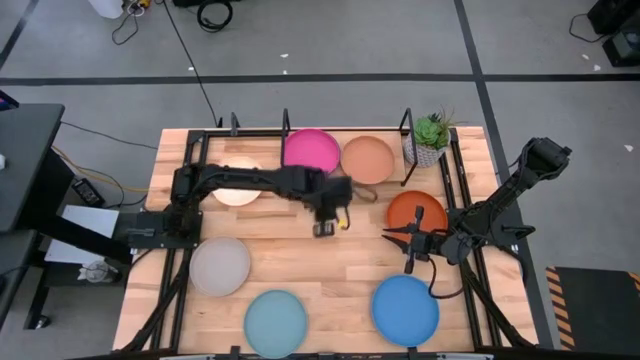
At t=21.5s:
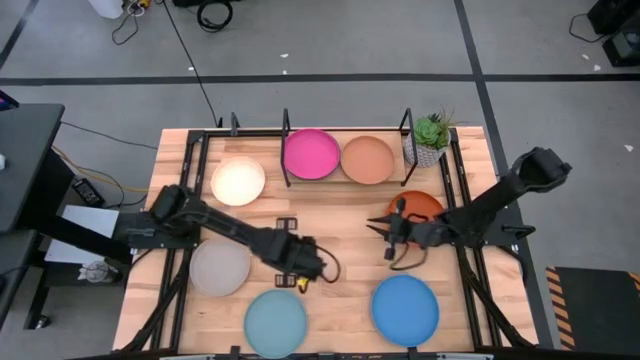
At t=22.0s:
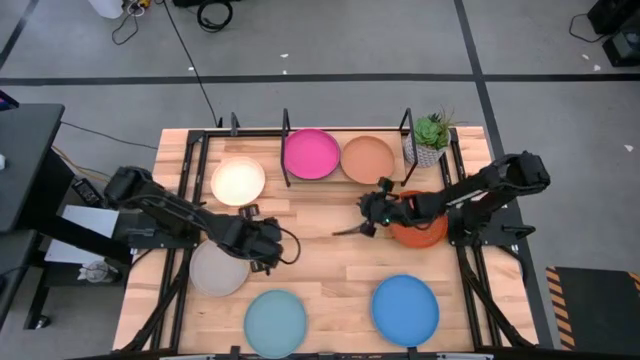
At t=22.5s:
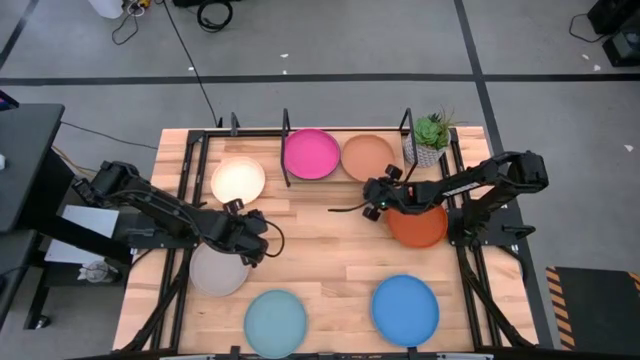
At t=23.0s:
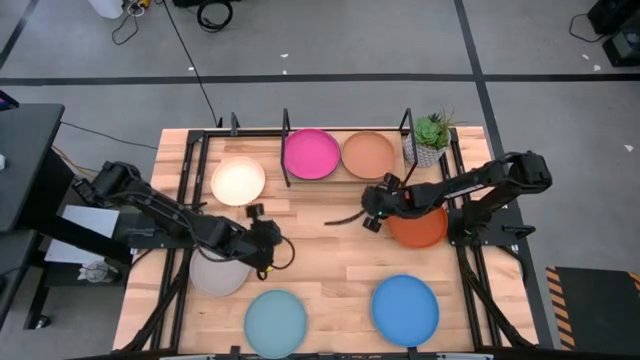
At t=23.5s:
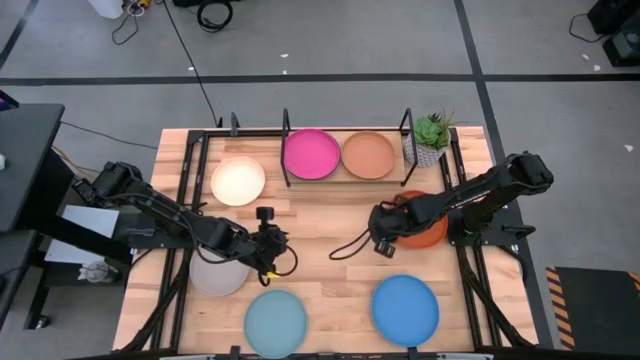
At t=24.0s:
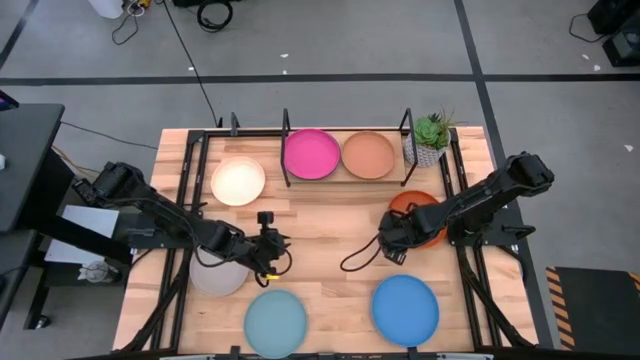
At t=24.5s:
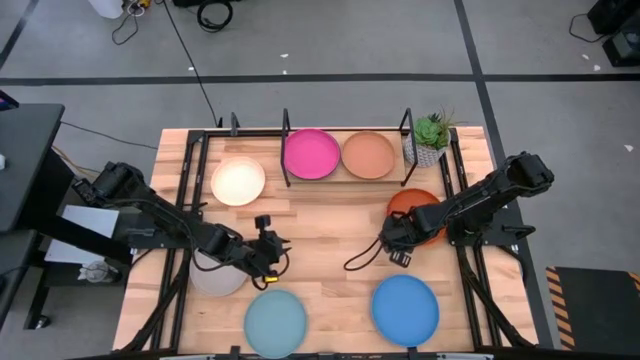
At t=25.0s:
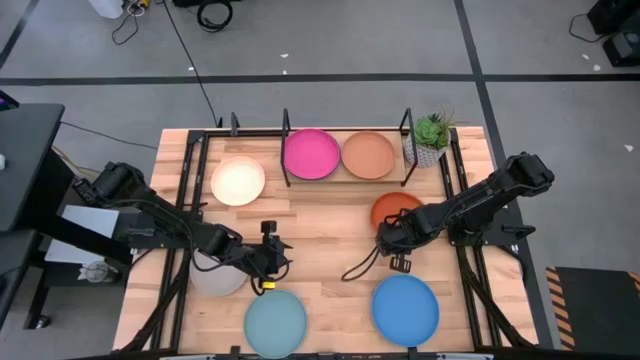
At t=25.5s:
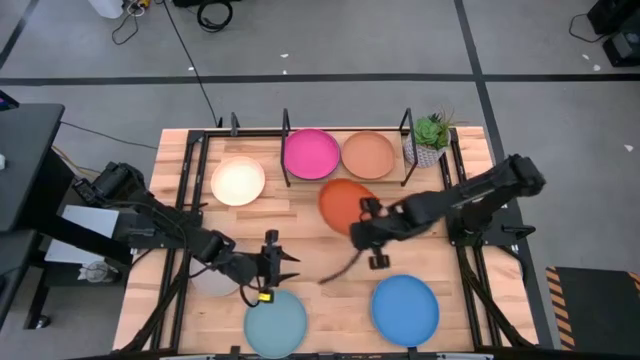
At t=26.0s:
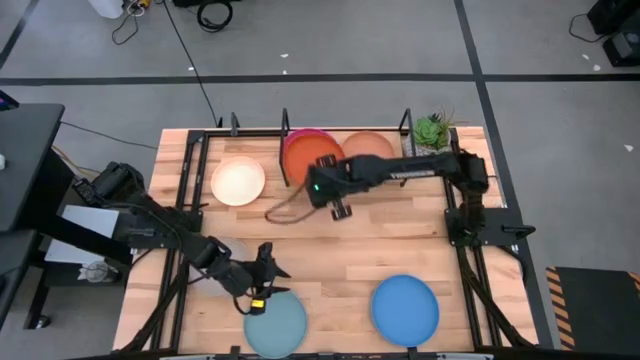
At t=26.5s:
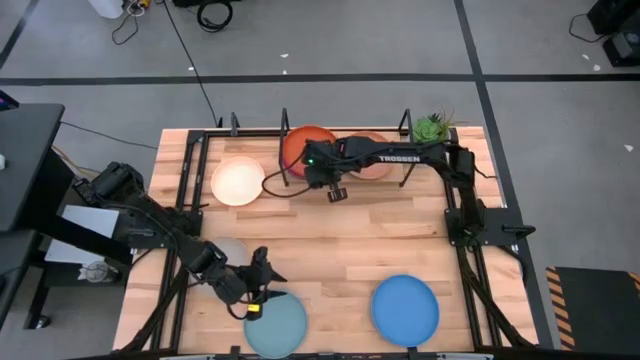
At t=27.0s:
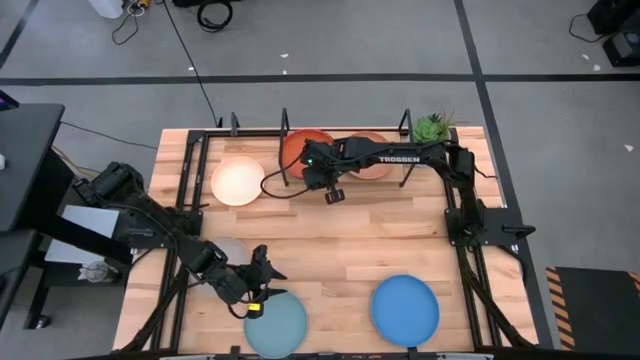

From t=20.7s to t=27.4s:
Task: Place and stack plates onto a shelf
Stack the orange plate on top of the pink plate on the shelf

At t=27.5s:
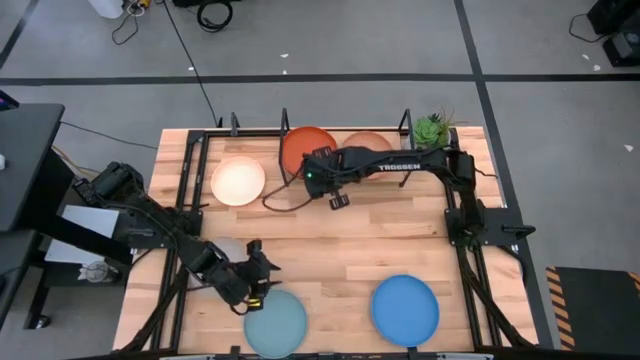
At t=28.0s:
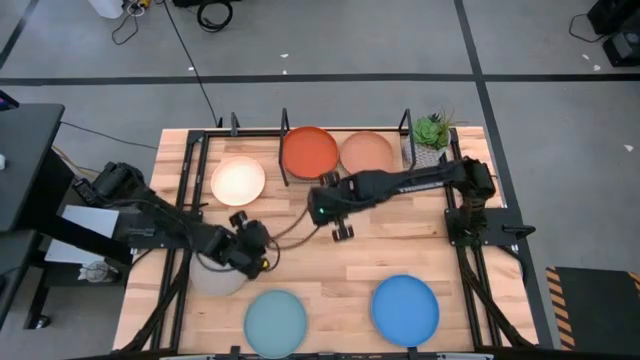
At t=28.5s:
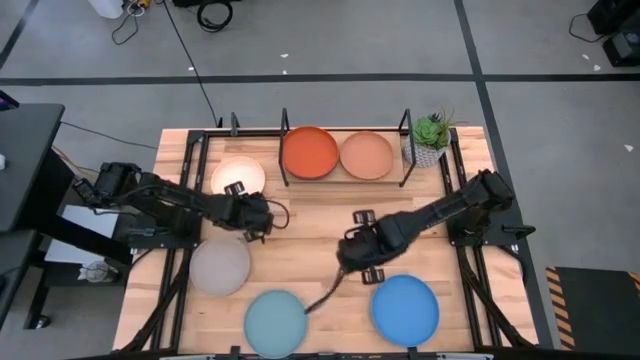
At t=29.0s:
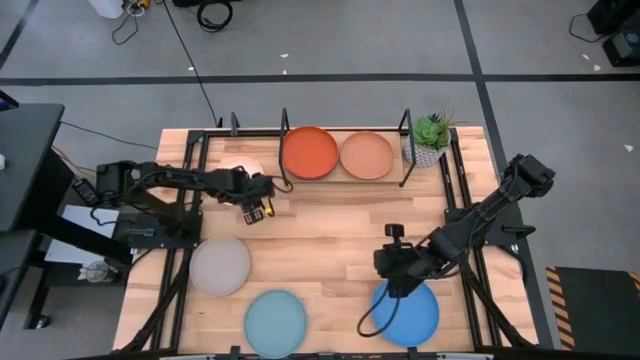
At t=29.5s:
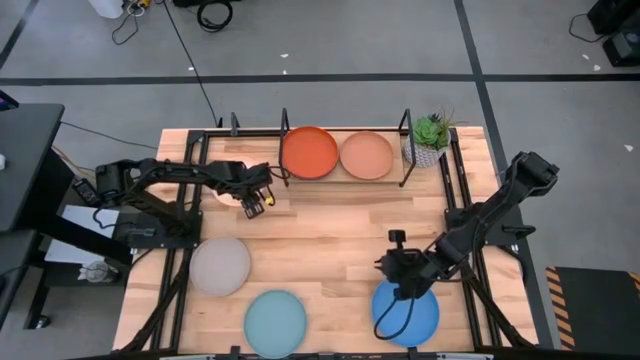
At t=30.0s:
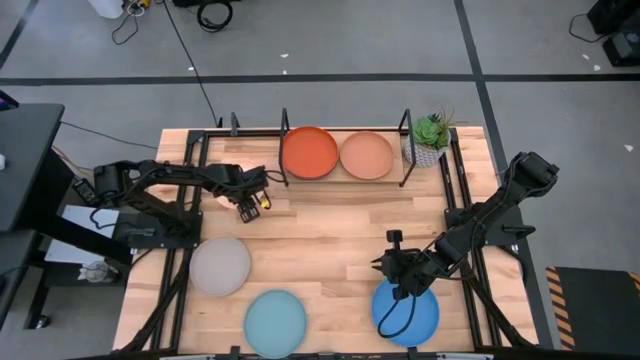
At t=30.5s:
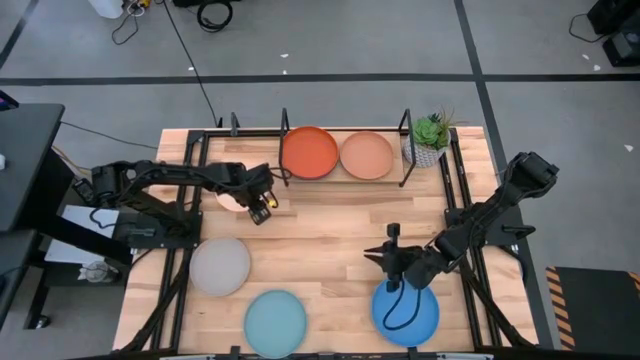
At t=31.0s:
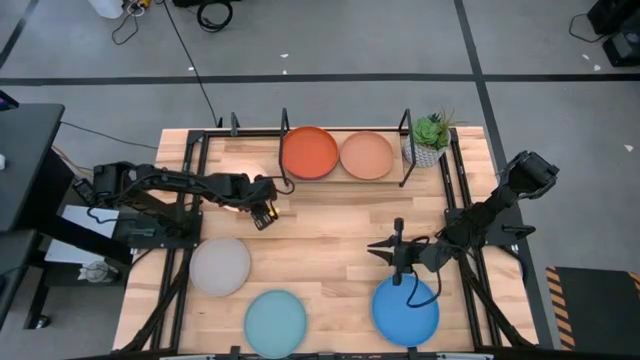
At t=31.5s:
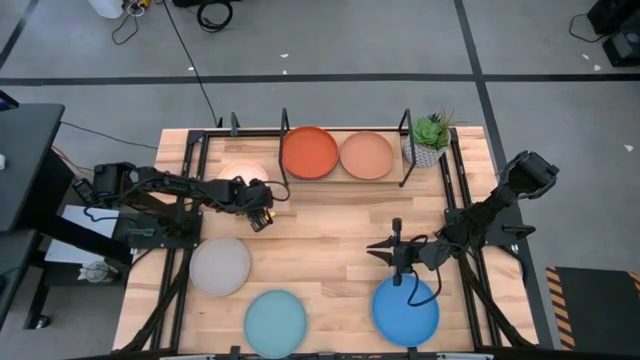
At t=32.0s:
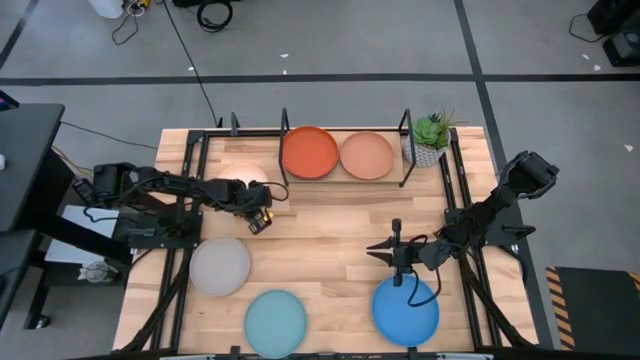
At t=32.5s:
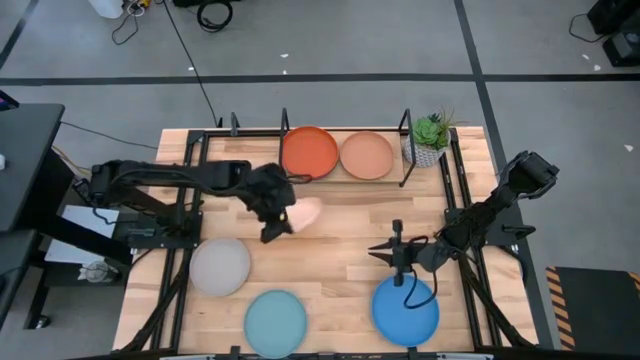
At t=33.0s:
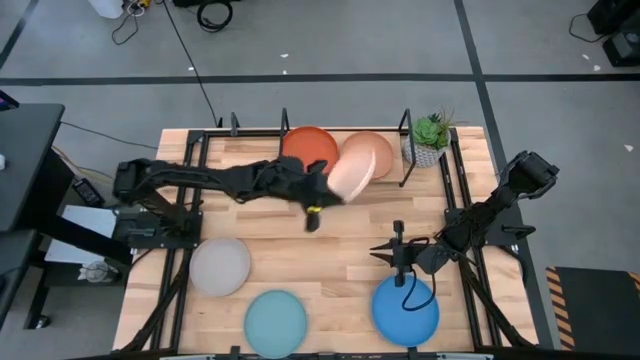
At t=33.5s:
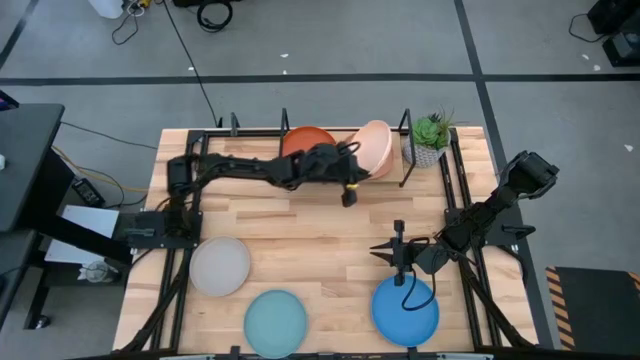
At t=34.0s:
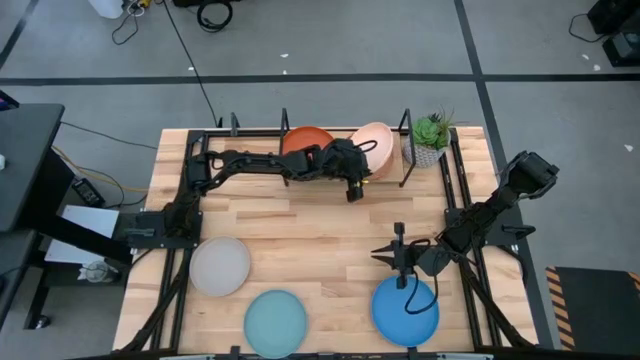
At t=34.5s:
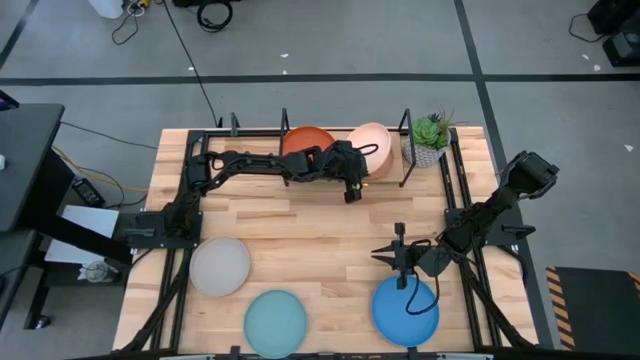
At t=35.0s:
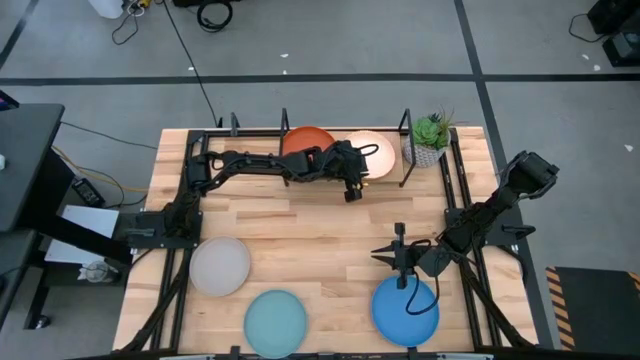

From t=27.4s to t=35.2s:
Stack the light pink plate on top of the brown plate on the shelf

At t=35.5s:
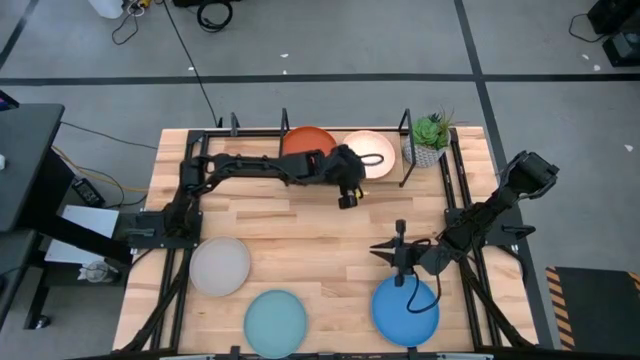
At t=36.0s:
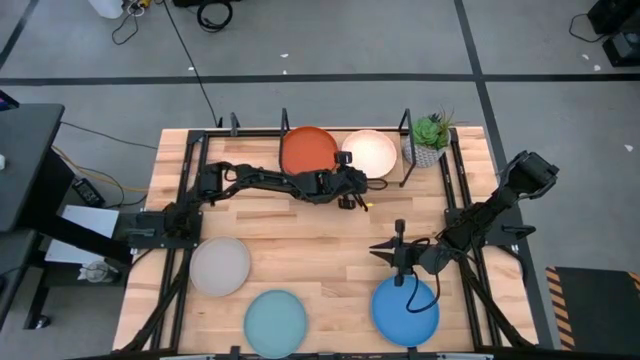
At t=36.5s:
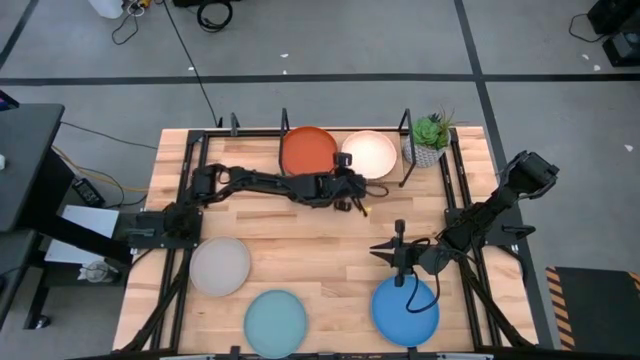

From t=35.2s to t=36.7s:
Adjust the light pink plate

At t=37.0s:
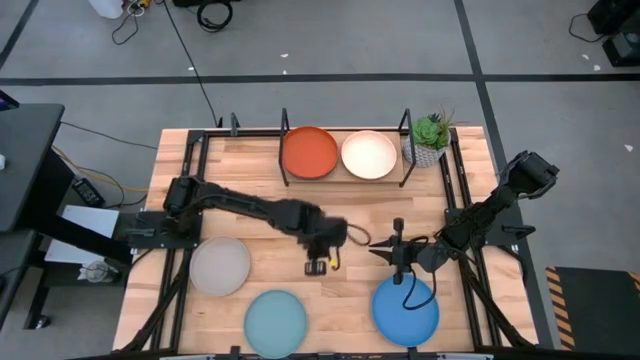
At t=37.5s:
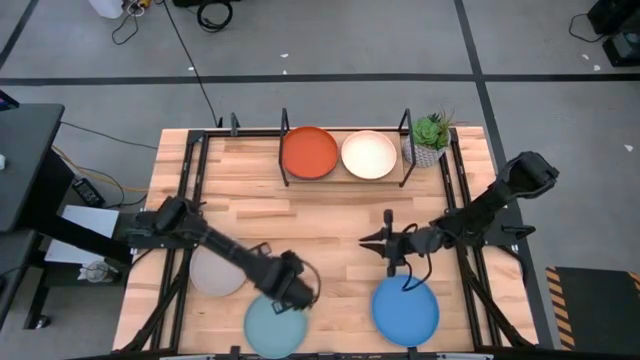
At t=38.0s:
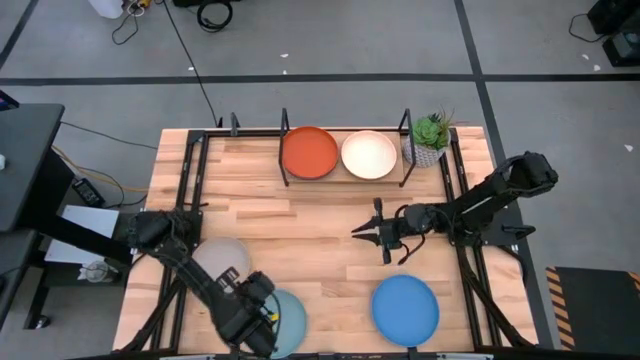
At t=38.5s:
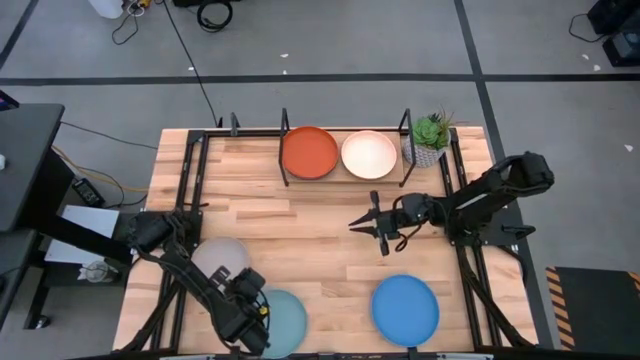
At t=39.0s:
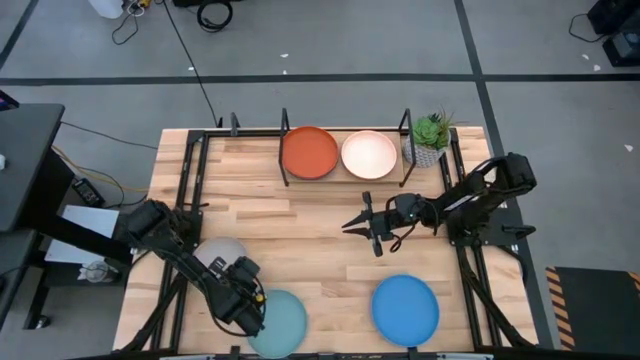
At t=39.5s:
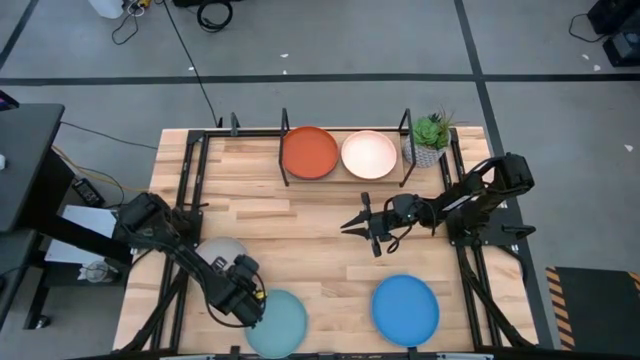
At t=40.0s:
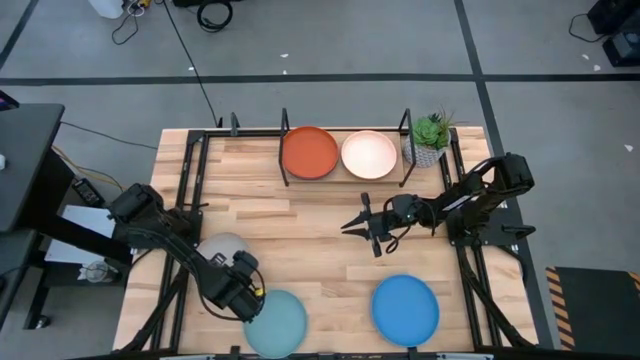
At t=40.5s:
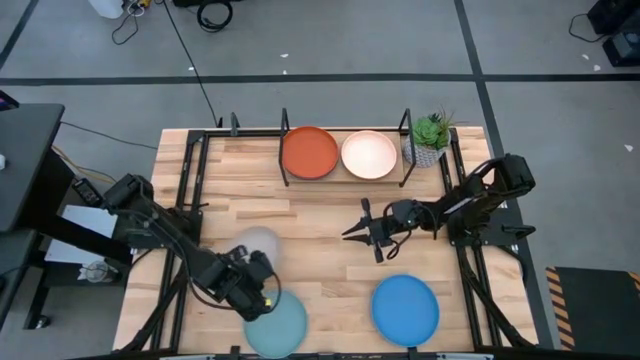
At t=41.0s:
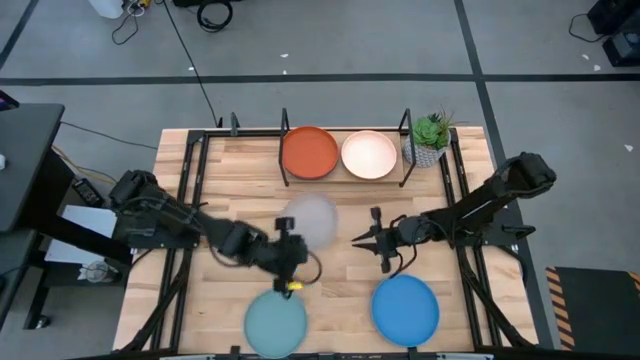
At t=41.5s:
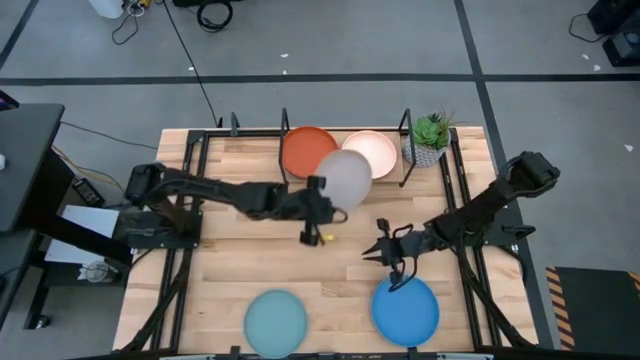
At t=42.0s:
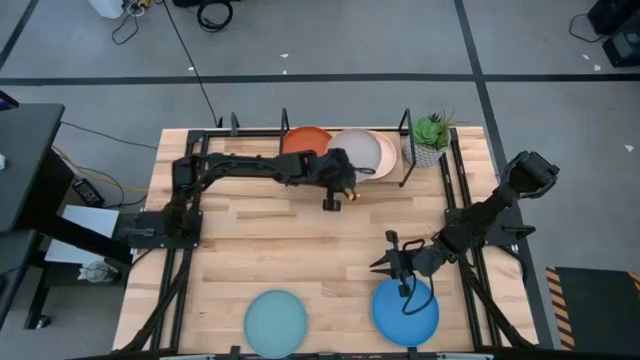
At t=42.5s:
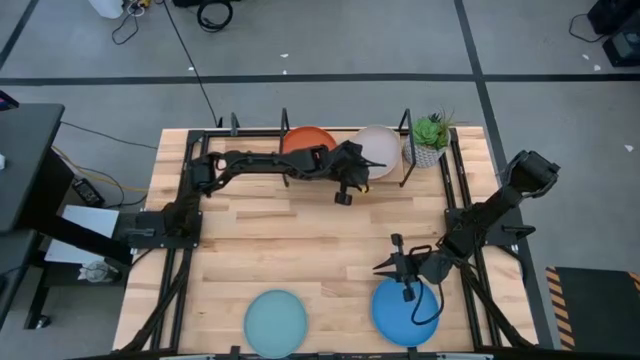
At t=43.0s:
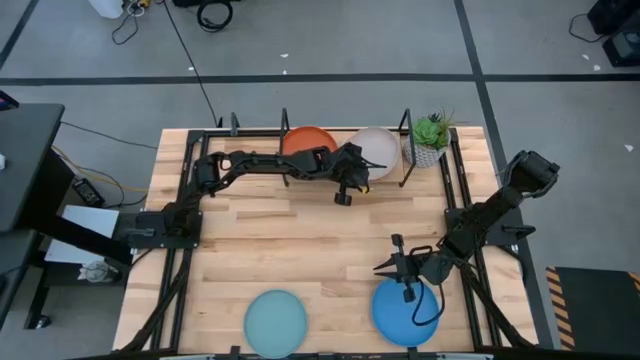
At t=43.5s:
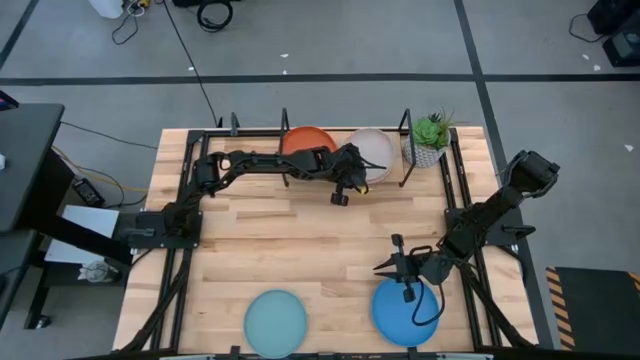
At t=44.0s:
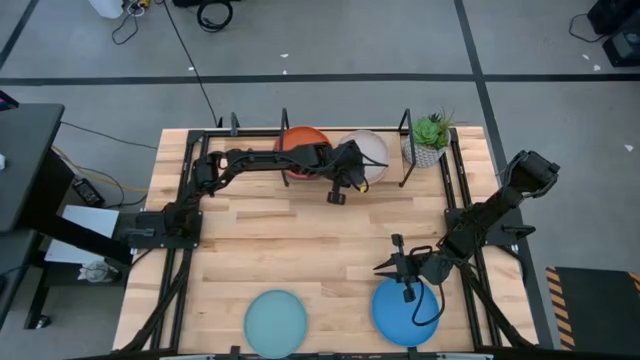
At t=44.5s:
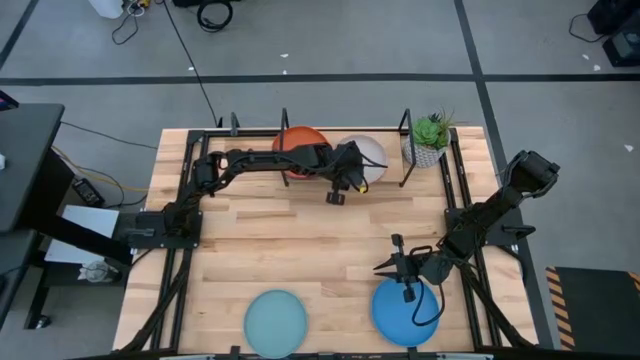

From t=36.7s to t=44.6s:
Stack the gray plate on top of the light pink plate on the shelf
